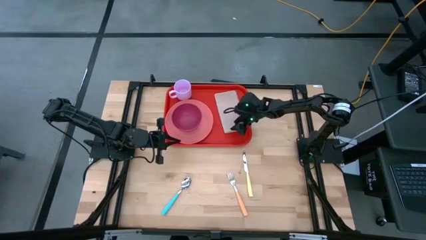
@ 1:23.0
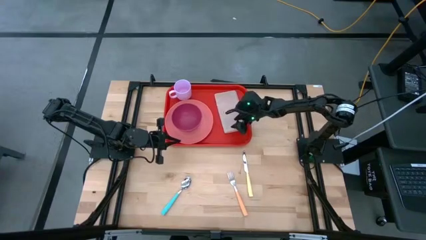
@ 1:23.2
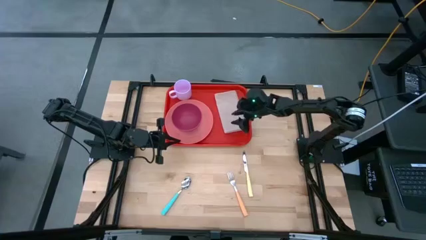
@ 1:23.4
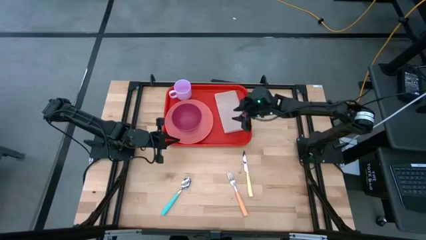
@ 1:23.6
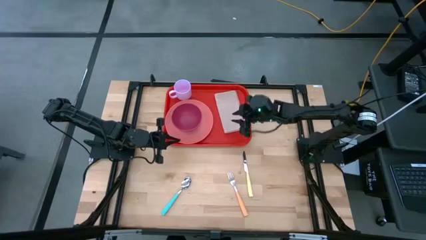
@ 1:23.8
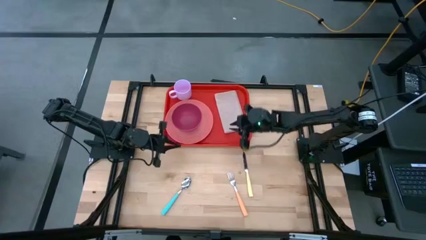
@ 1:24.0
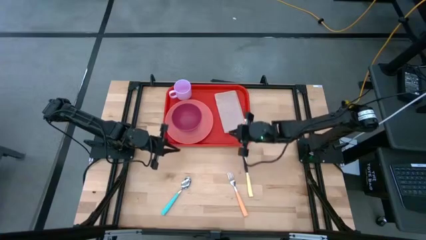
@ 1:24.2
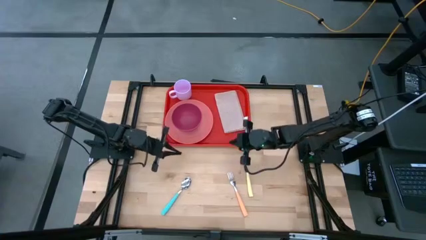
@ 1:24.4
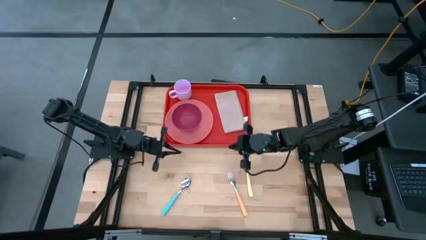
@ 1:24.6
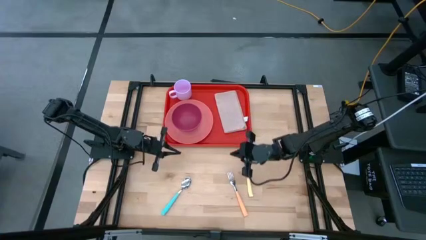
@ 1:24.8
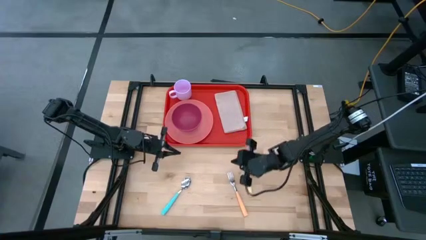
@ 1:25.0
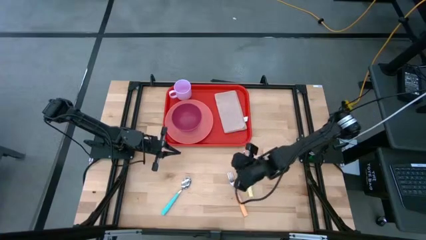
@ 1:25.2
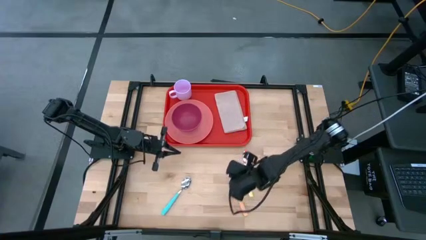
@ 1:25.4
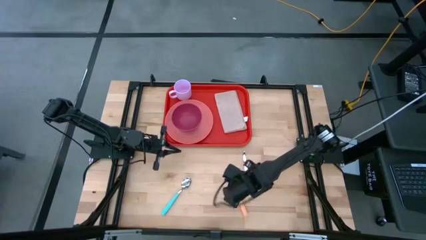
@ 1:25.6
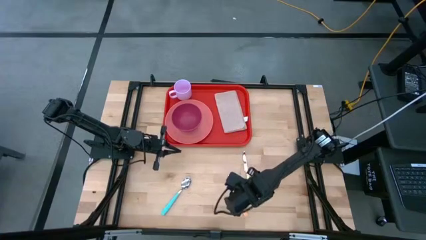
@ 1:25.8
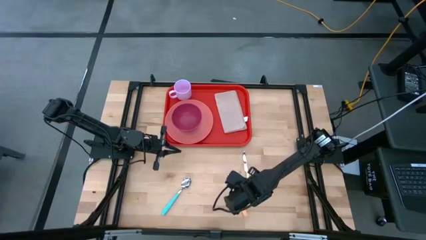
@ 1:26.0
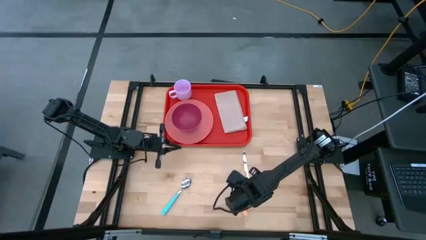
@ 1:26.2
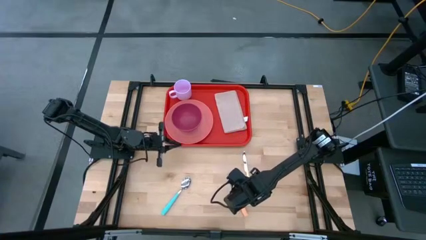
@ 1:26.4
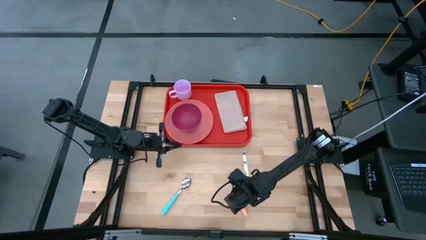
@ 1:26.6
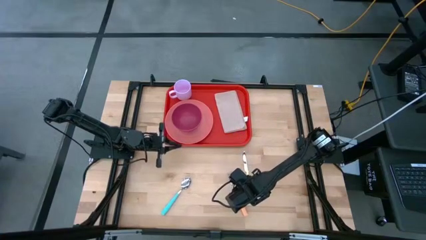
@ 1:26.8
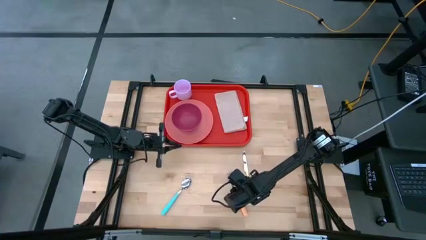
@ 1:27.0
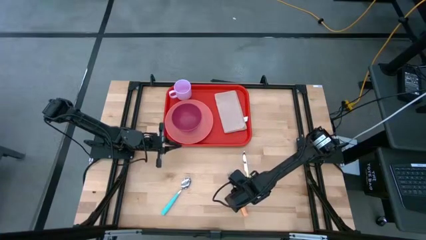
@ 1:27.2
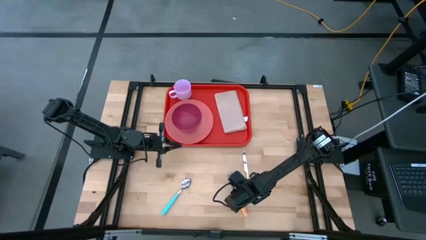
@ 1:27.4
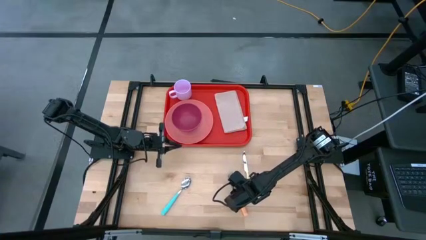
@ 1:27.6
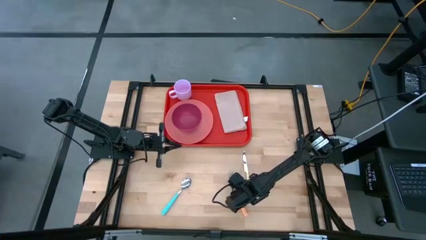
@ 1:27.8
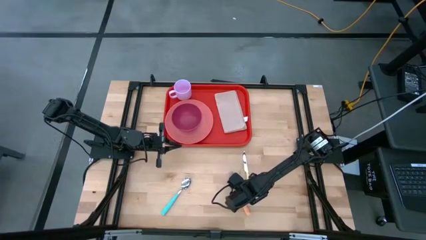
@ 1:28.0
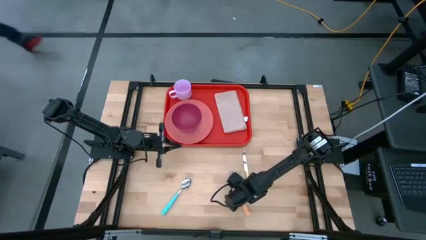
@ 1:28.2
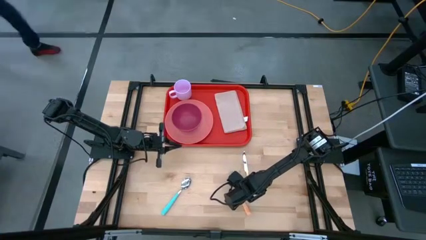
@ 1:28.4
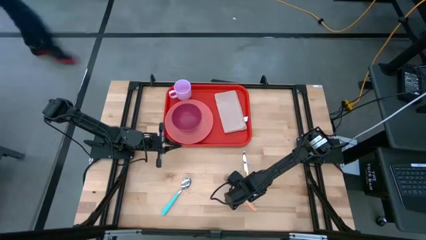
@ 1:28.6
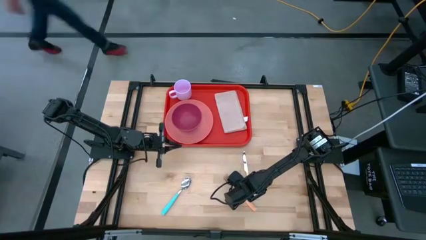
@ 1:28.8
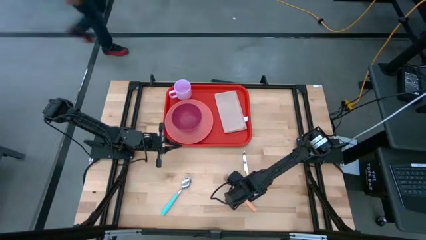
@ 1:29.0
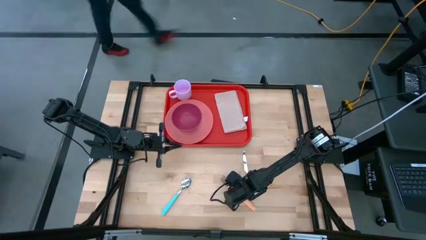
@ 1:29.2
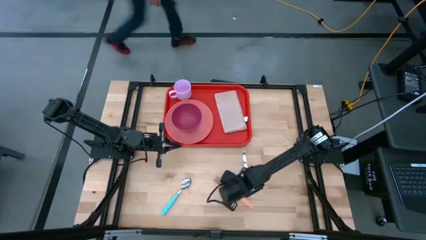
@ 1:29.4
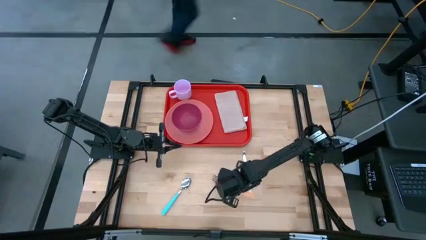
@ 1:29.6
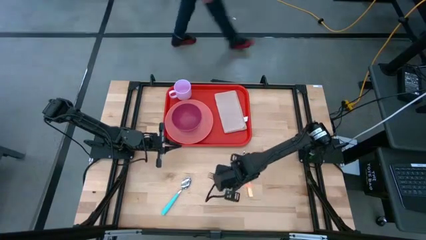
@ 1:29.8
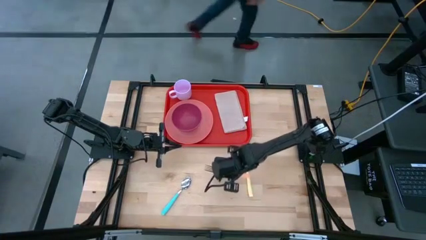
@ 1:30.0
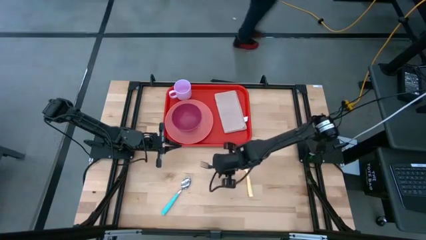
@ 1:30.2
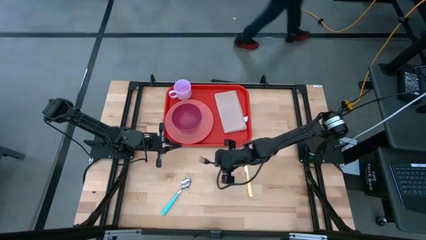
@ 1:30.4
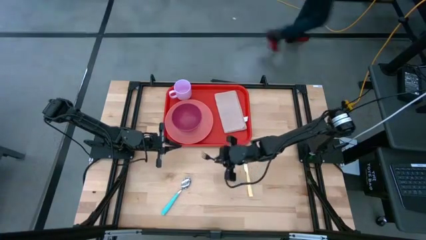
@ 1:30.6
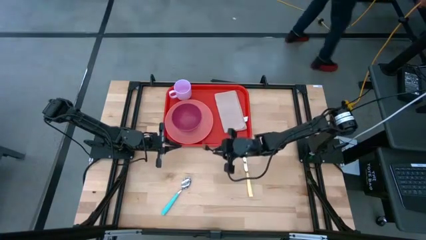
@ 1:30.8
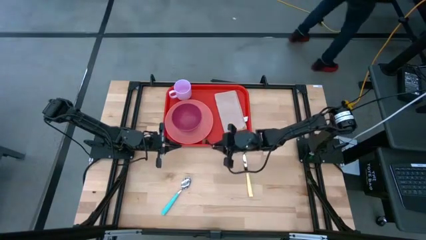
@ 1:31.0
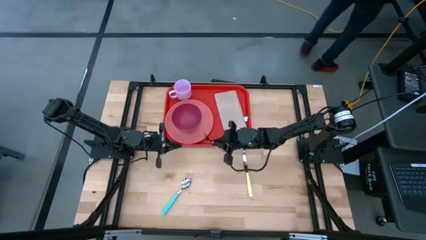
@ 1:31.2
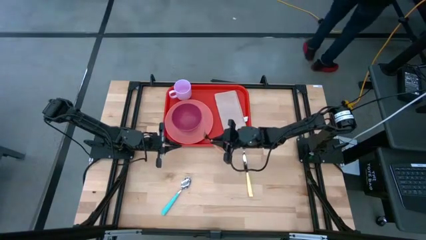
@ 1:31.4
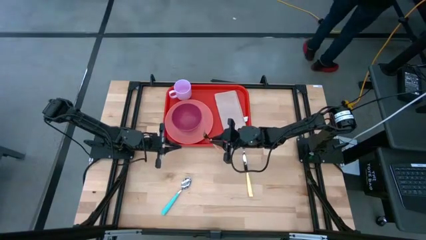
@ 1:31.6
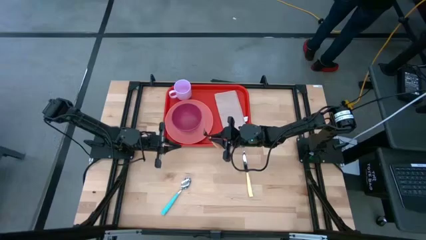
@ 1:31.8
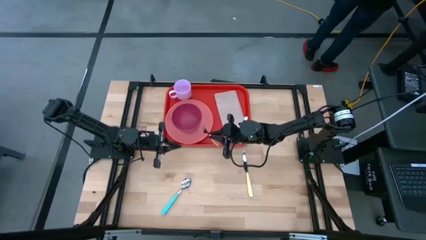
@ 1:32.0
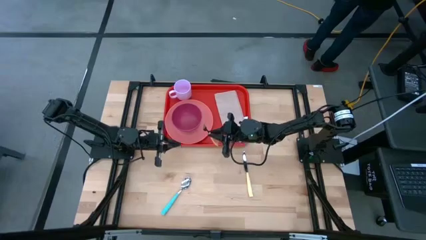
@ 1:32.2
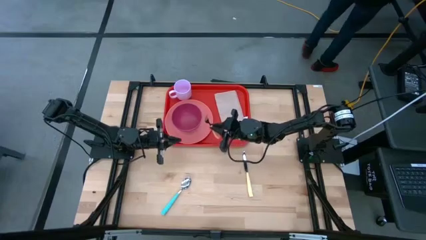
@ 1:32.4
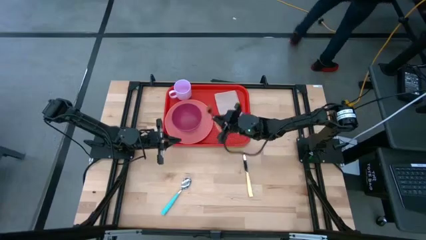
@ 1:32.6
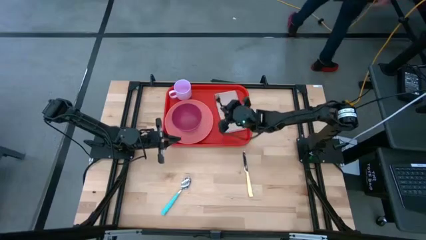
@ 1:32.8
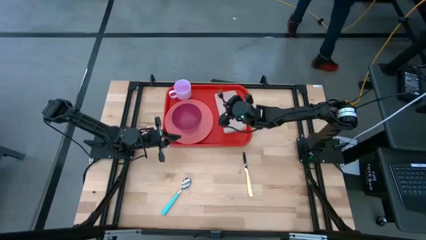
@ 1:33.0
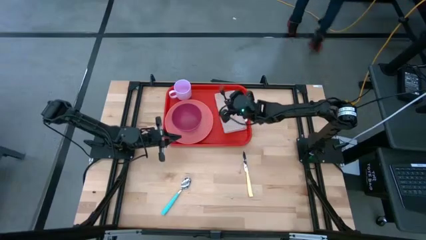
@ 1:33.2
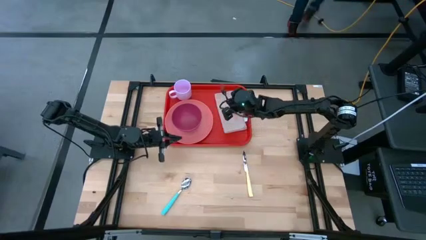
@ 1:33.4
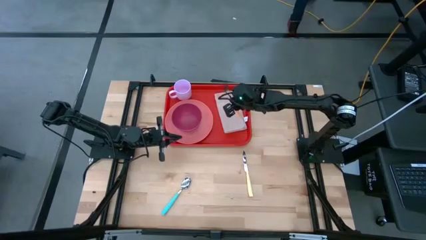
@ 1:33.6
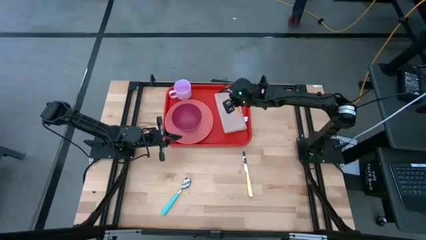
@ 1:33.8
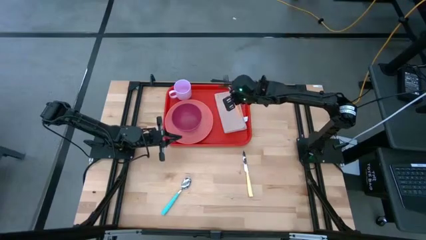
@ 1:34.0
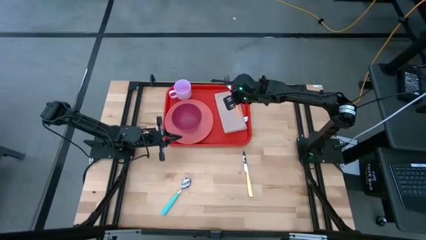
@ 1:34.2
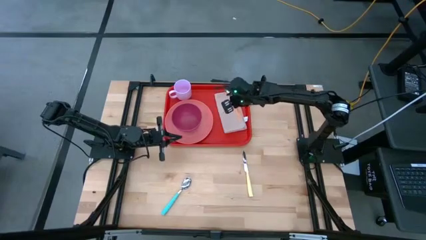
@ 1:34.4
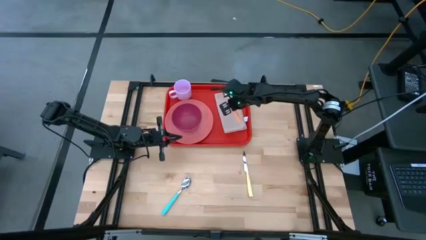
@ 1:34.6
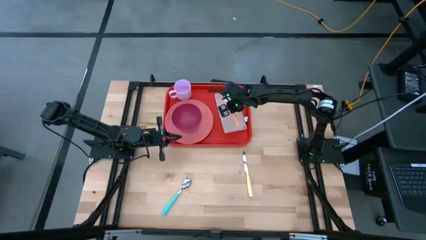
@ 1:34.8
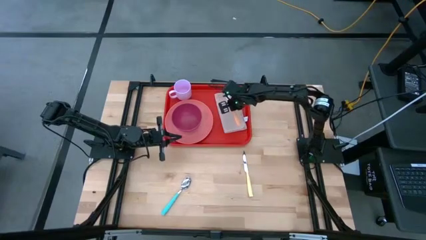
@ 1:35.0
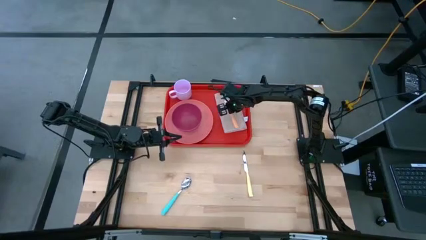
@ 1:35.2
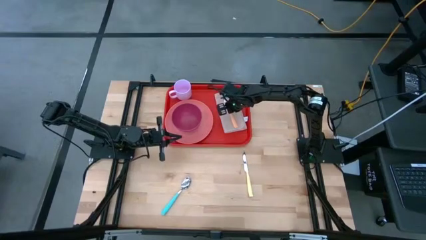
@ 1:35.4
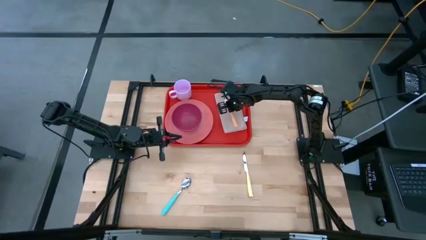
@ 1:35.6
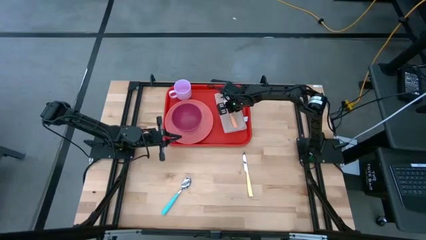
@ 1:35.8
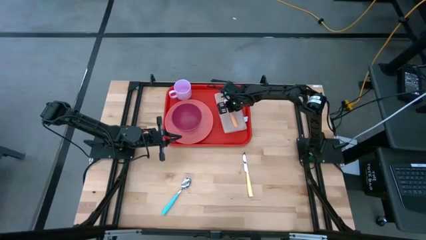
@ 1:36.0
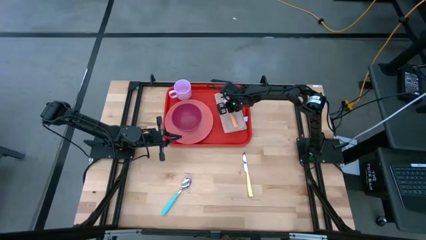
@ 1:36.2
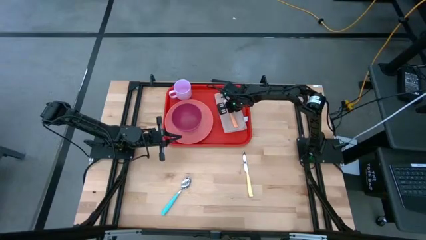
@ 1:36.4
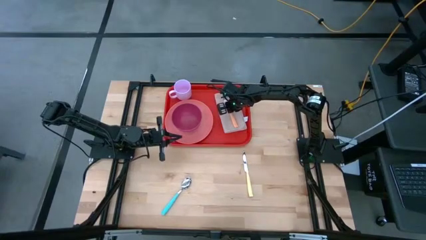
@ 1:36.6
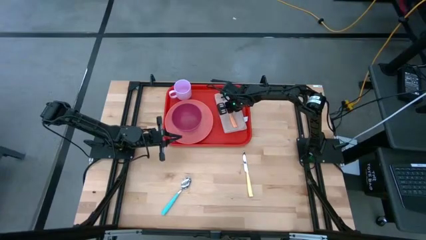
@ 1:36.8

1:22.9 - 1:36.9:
Task: Set up tray
Put the orange fork on top of the white table napkin

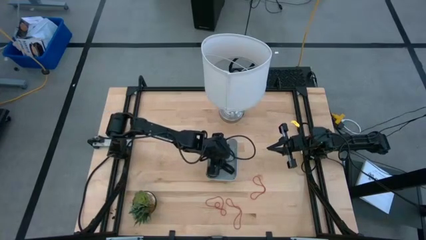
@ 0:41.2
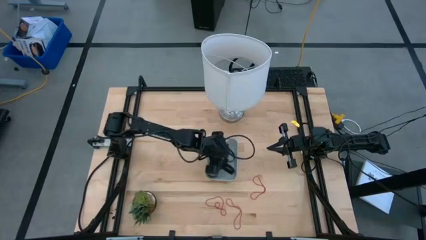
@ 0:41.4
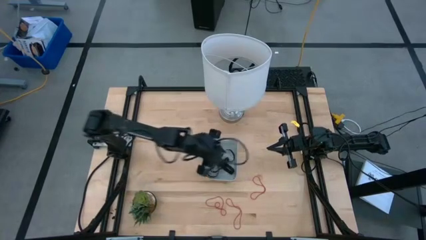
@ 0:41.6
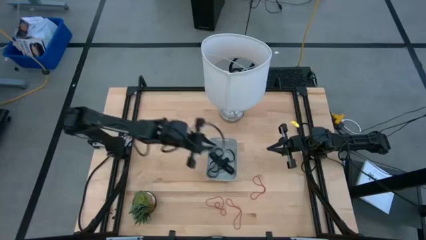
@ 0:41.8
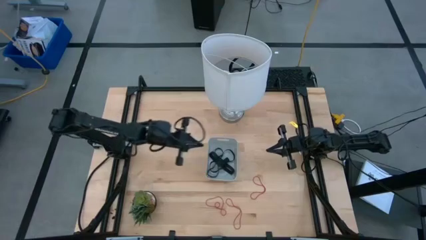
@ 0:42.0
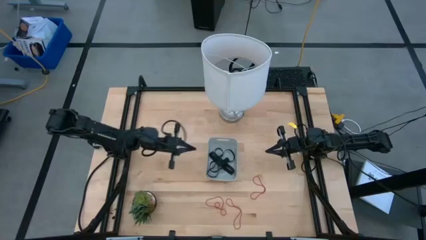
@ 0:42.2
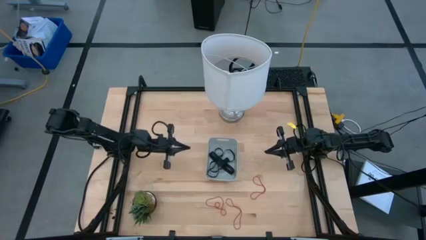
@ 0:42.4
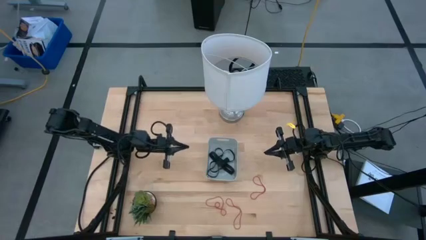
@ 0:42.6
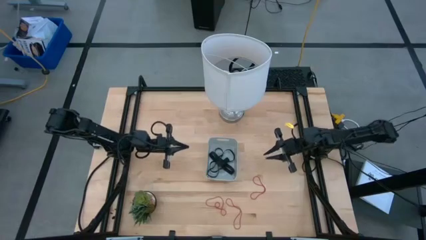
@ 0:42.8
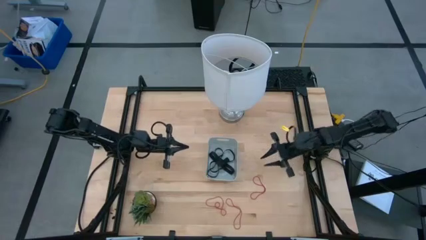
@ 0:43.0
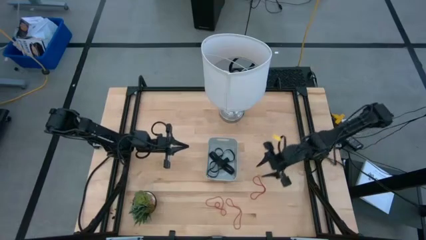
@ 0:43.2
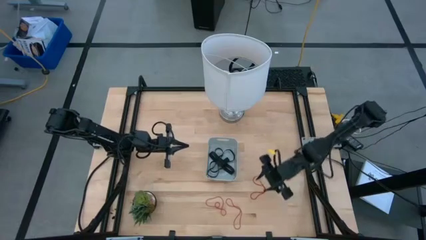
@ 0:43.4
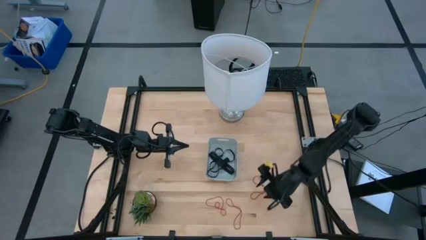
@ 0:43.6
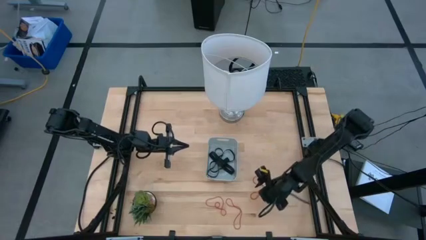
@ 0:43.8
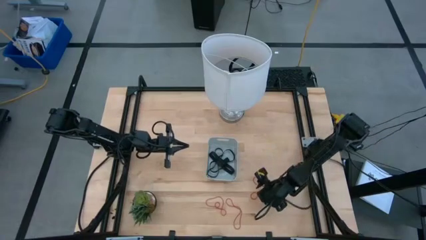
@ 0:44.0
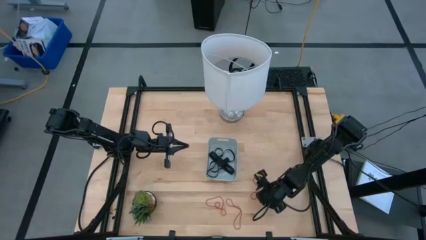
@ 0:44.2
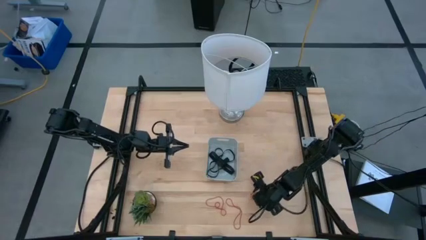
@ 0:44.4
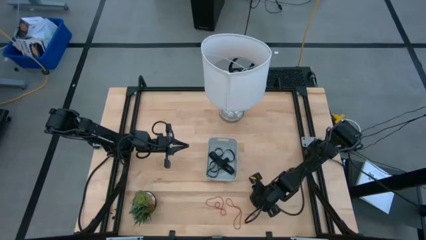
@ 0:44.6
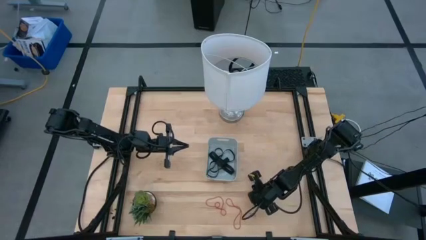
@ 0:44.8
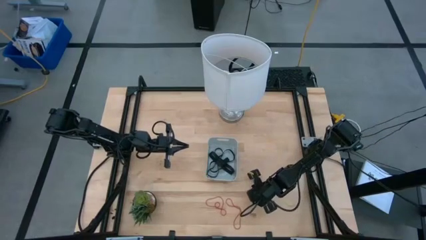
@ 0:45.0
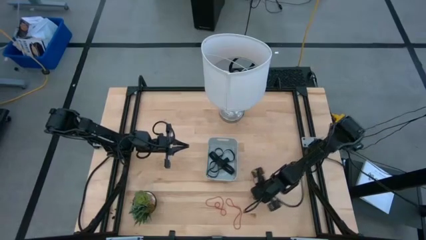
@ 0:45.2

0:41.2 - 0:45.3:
Task: Pick and place rubber bands into bin
Put the red rubber band into the gray bin
